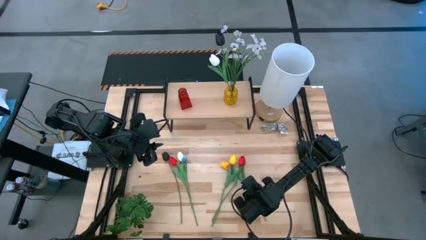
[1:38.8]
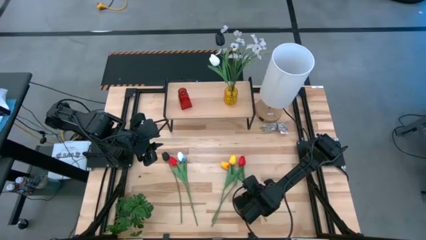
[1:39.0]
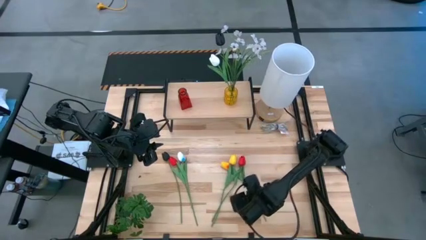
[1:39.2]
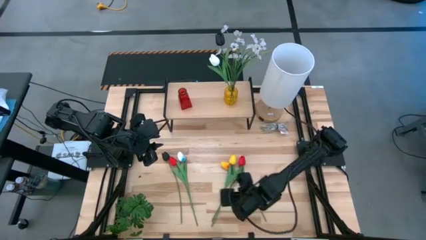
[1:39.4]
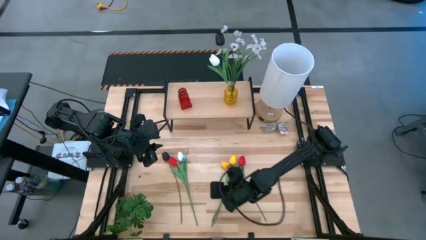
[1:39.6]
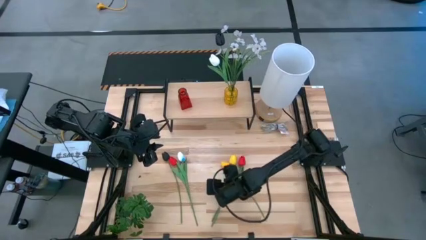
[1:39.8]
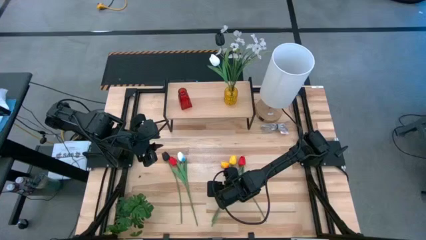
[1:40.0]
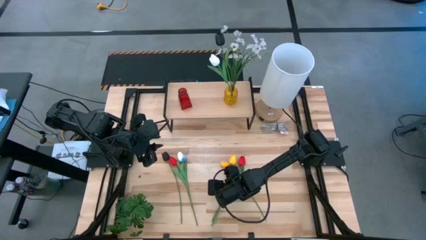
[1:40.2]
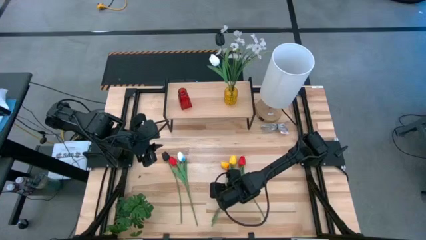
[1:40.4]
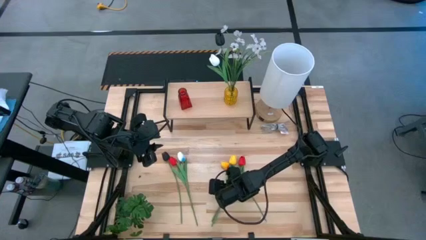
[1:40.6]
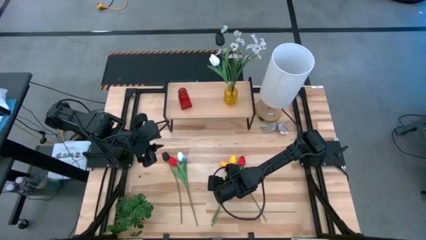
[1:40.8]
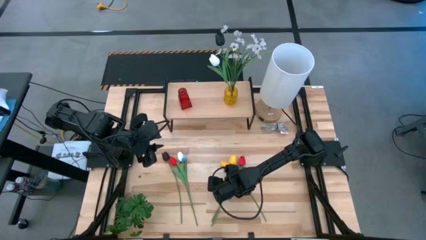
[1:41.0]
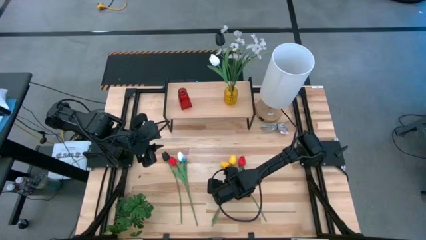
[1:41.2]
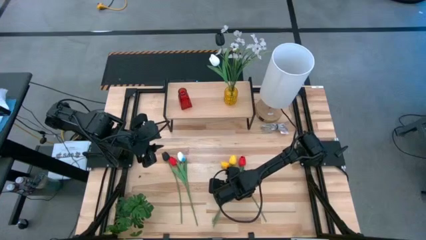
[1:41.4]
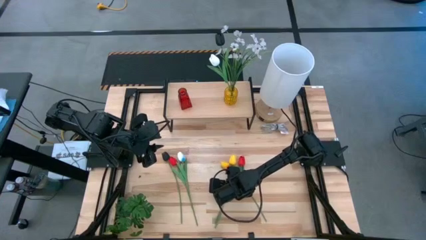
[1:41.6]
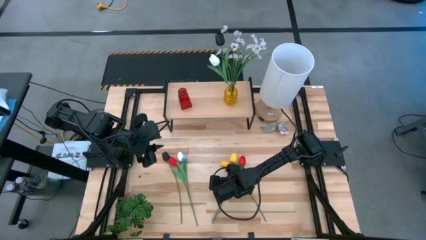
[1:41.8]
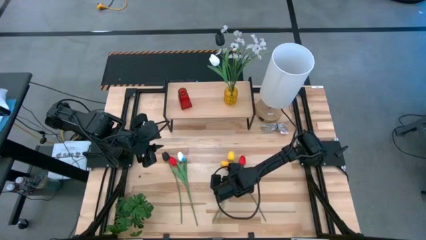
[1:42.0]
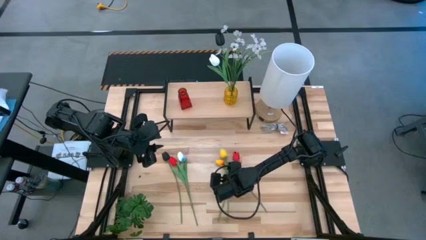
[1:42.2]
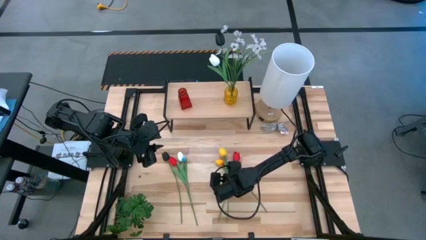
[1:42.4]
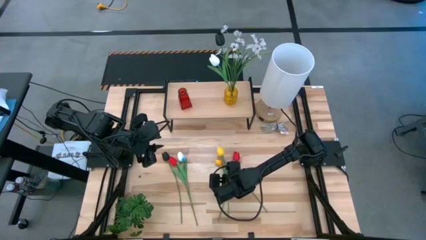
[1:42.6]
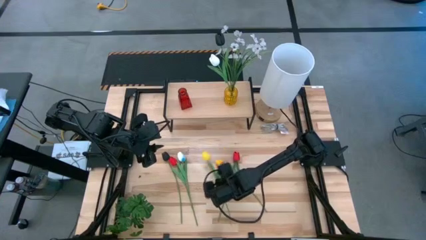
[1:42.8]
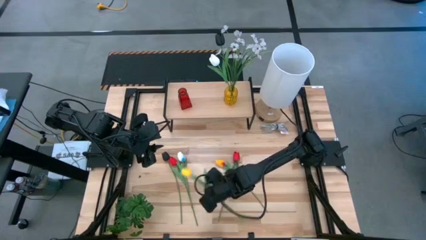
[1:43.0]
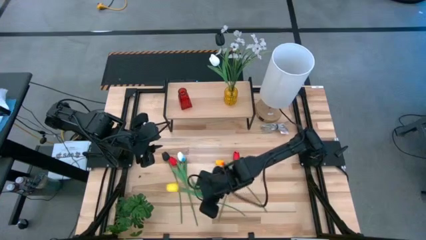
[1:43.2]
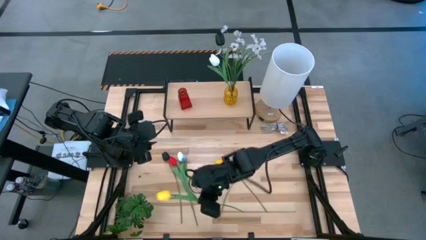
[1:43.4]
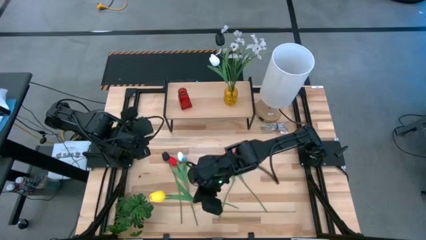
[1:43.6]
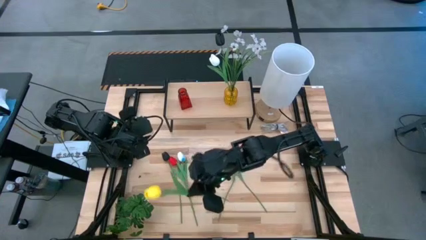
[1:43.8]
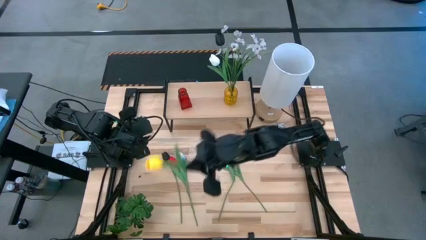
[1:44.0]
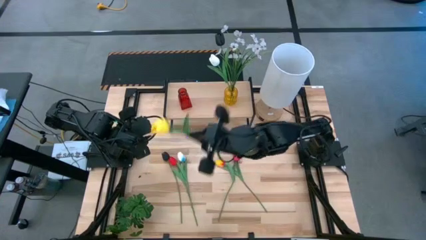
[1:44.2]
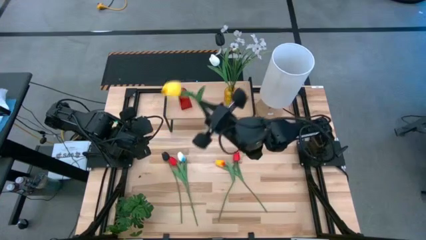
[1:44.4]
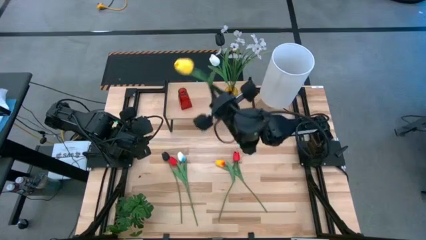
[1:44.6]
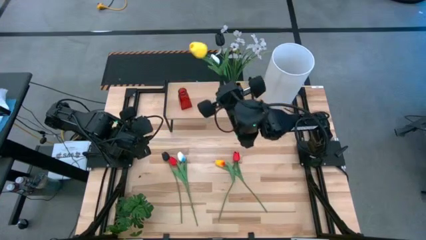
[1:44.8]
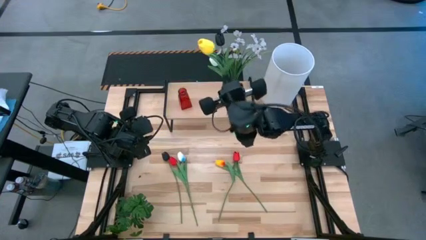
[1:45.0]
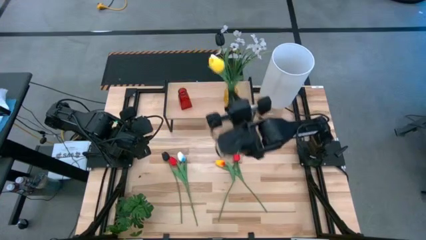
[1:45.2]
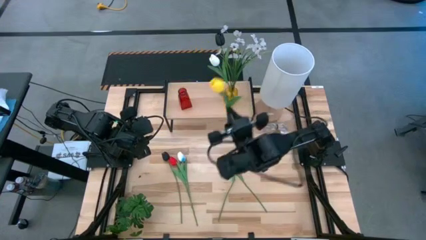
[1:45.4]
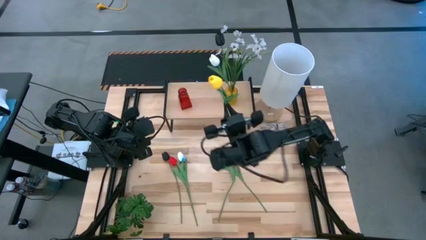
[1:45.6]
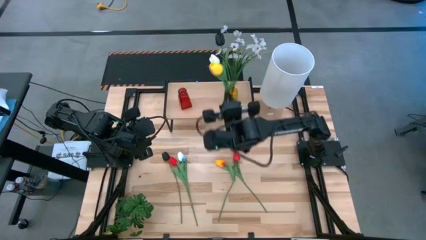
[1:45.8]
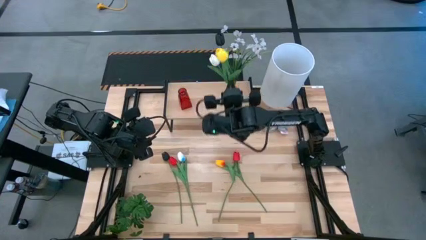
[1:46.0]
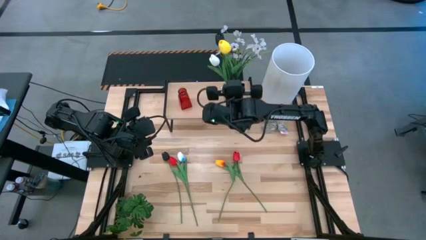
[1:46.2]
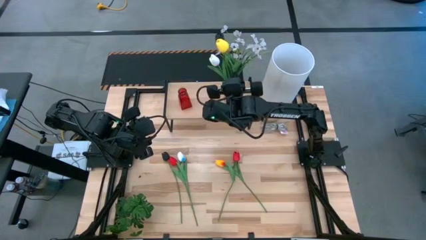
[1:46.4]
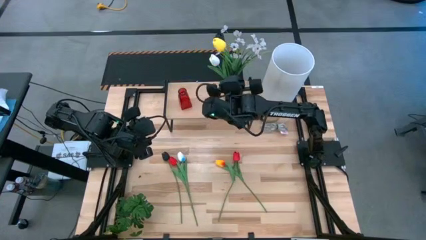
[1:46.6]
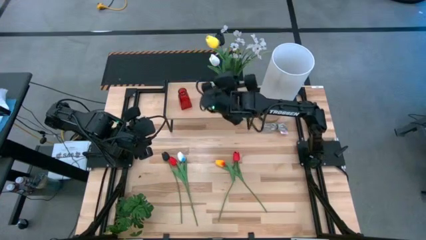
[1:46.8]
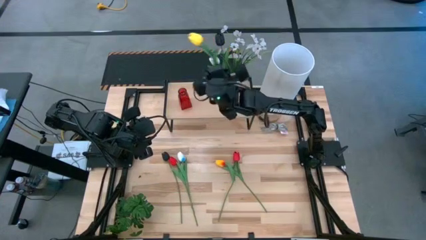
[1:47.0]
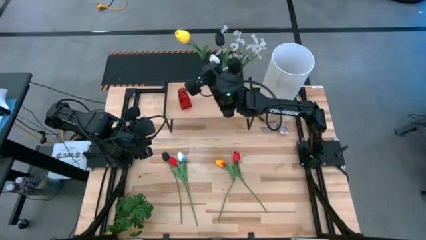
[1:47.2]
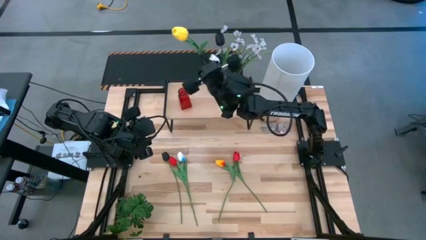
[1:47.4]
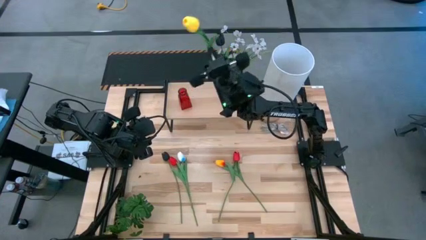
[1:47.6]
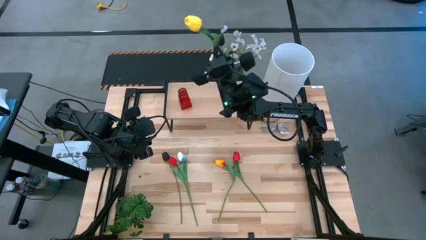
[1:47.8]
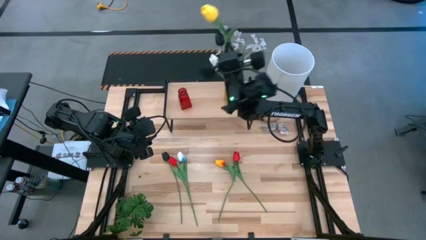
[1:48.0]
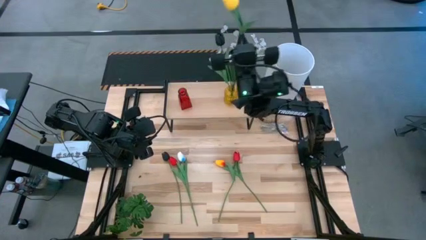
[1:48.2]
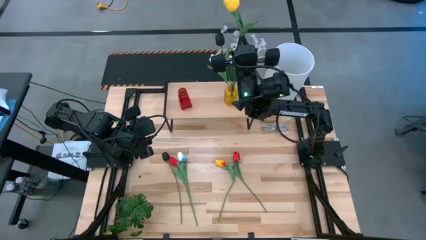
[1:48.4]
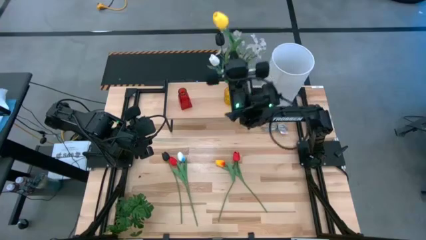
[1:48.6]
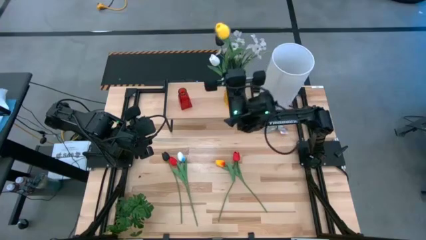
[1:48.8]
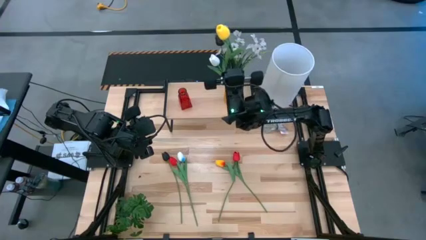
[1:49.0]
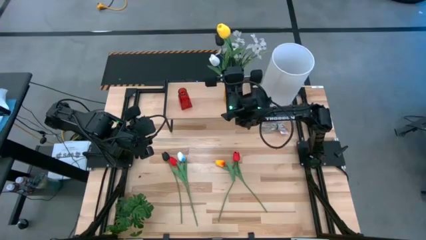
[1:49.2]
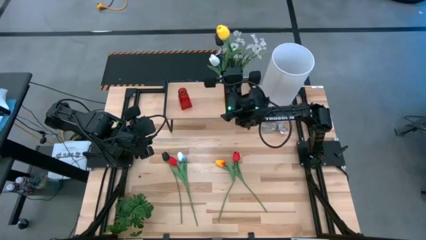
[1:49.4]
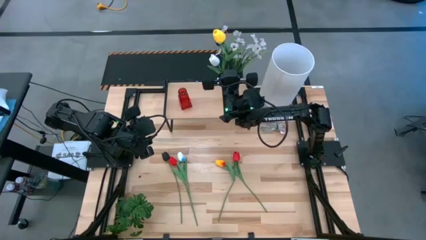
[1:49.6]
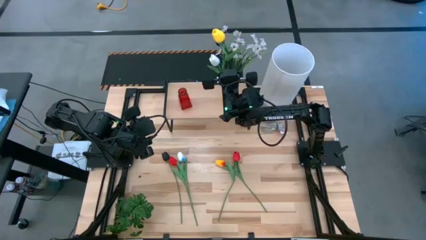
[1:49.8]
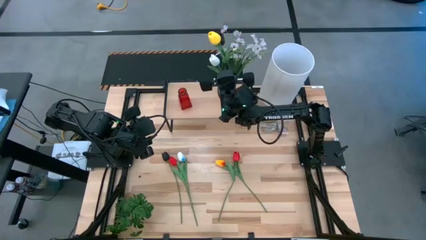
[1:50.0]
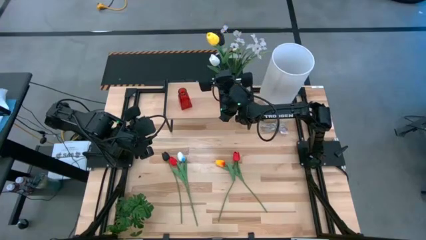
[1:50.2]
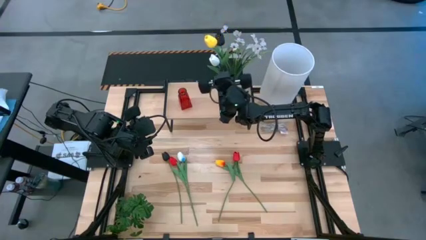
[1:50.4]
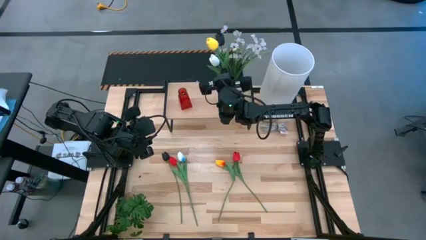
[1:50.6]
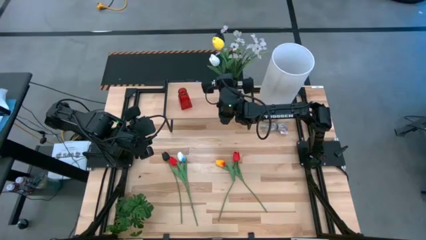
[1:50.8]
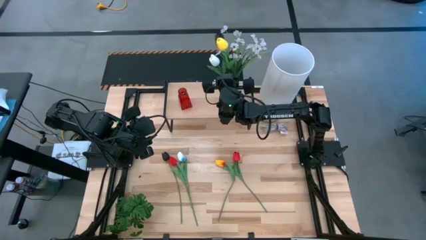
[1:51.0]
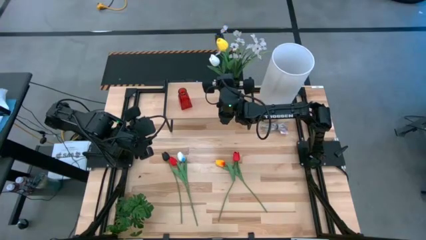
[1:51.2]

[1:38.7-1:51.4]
Task: Pick and place flowers into a vace then onto a shelf
Put the left yellow tulip into the yellow flower vase

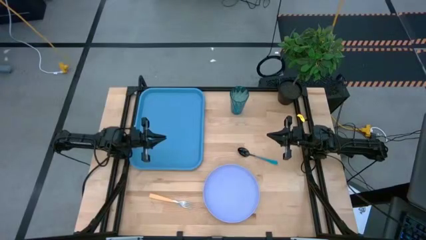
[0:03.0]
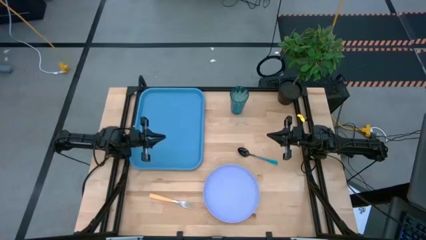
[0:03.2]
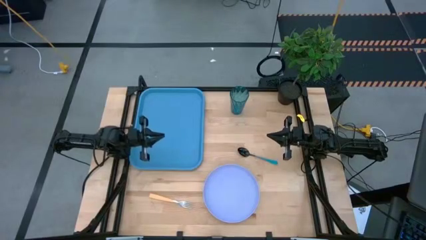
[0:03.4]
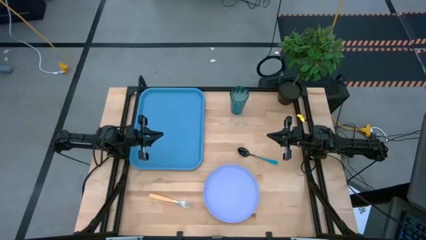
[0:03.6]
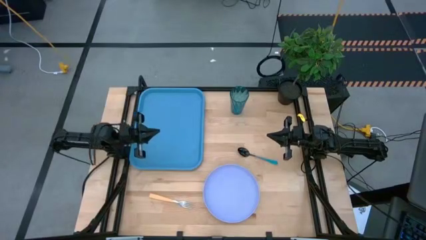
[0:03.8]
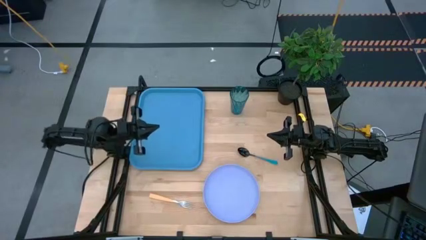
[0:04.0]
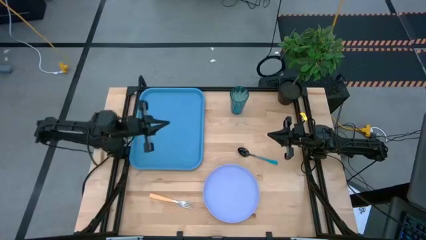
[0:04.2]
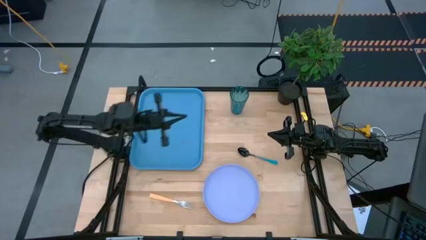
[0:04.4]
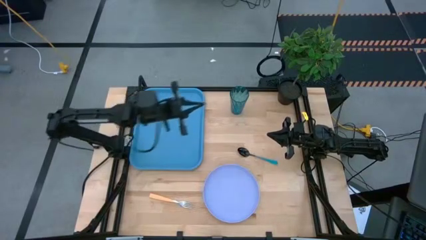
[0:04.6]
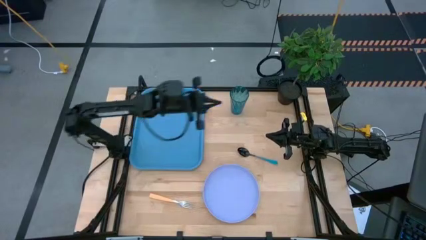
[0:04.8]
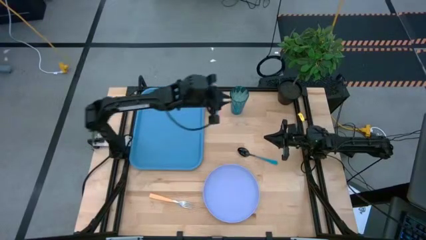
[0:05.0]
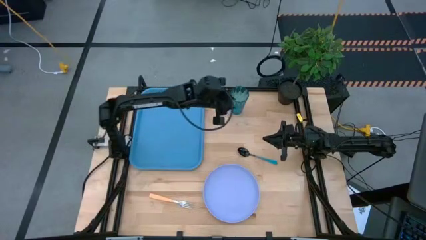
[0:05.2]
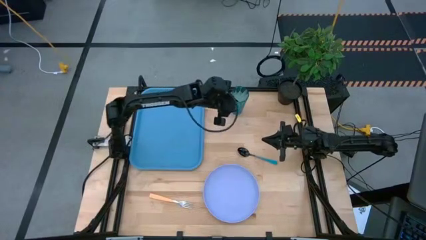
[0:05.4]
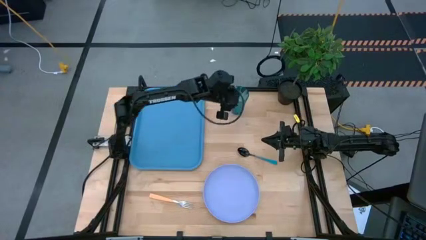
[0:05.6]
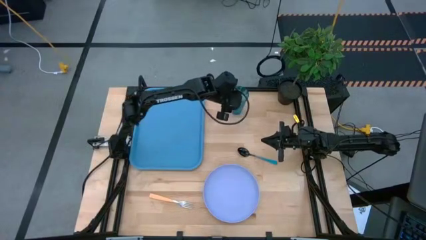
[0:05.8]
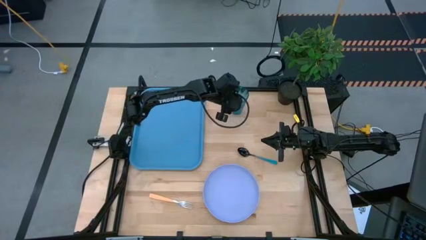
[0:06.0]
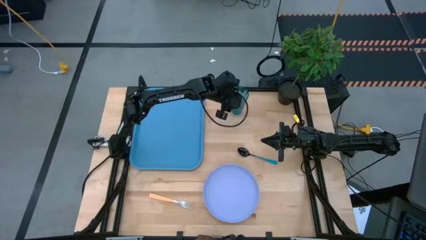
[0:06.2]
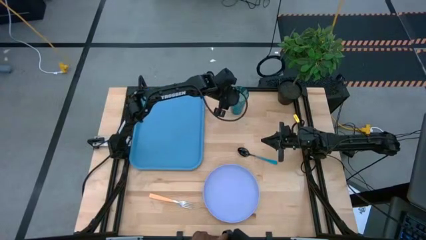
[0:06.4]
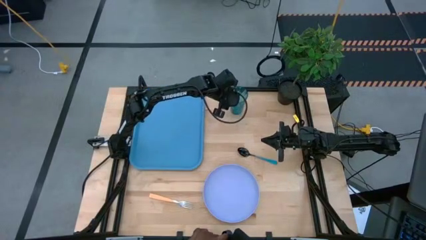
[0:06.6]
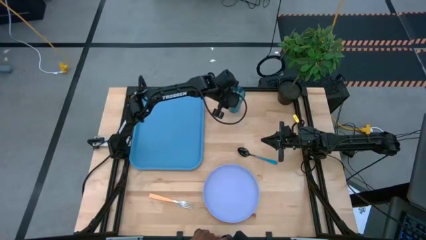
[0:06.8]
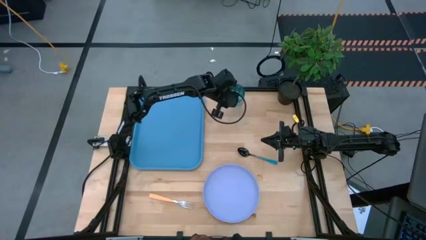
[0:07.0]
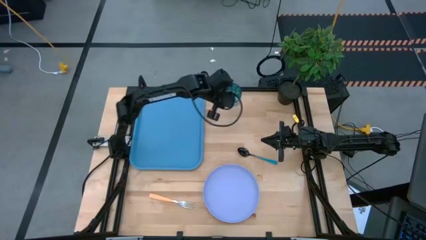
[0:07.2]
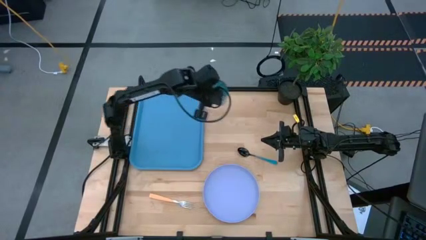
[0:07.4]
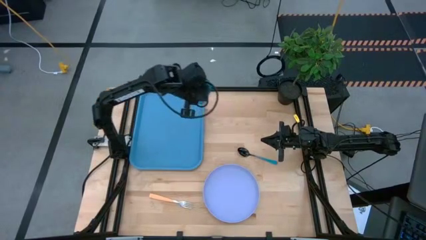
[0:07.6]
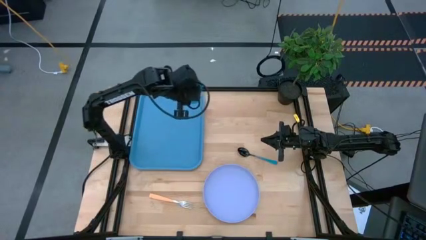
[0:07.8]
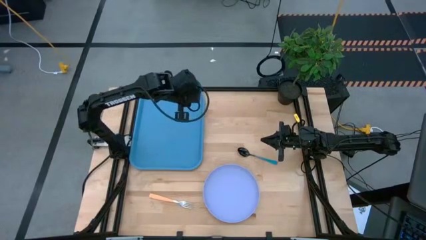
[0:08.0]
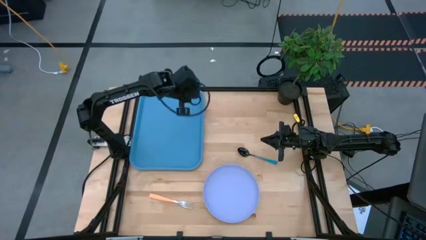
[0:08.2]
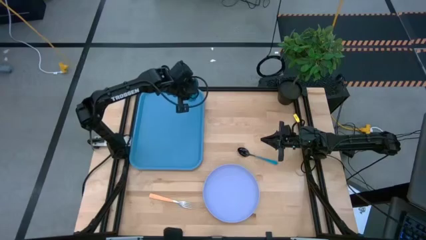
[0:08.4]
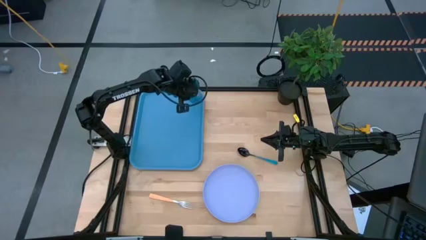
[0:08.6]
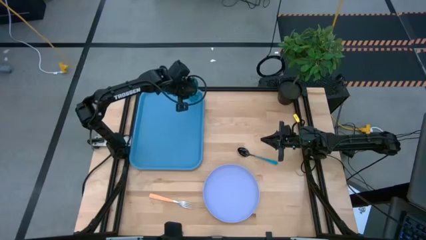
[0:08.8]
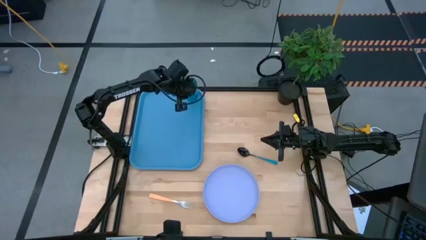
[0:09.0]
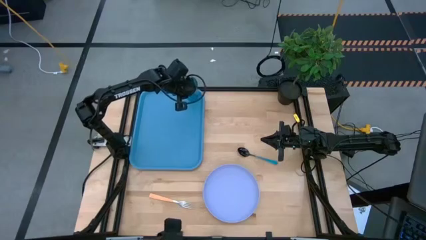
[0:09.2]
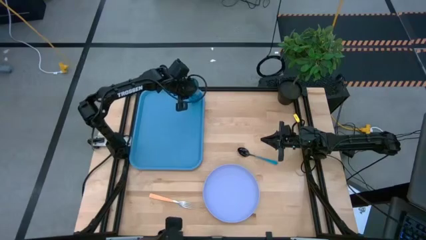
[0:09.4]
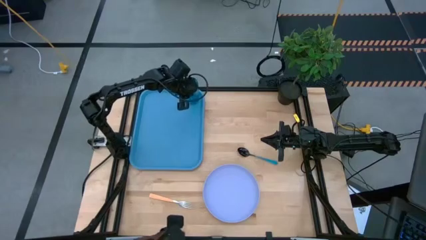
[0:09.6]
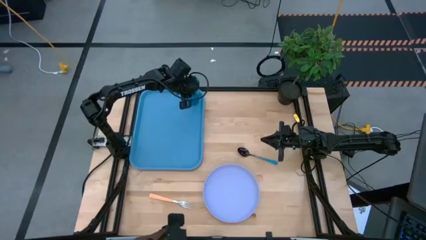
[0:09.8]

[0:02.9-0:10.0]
Task: Pick and place plate/cup/fork/spoon on tray
Put the blue glass cup on the blue tray
